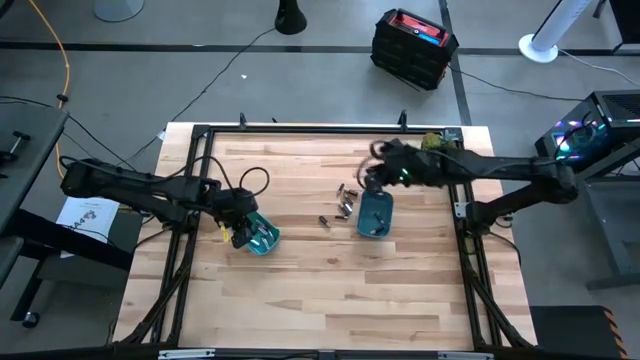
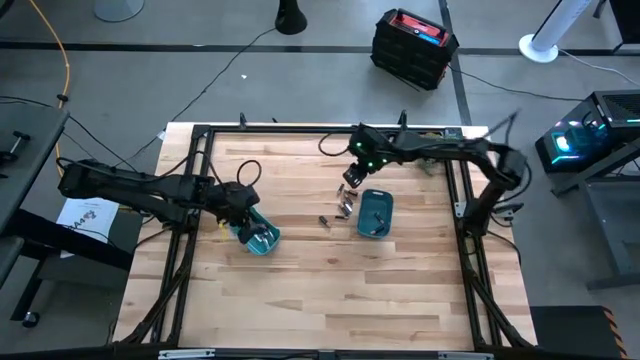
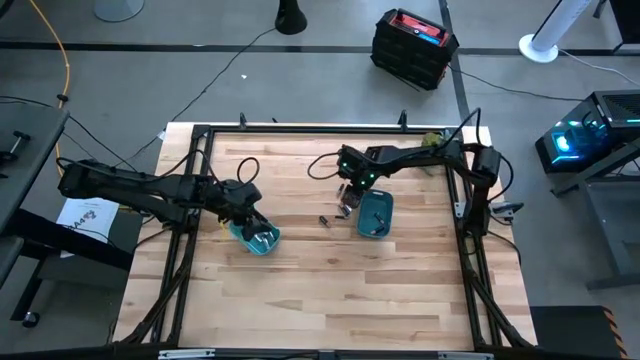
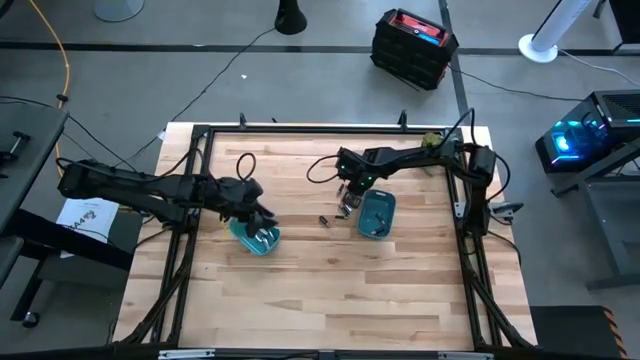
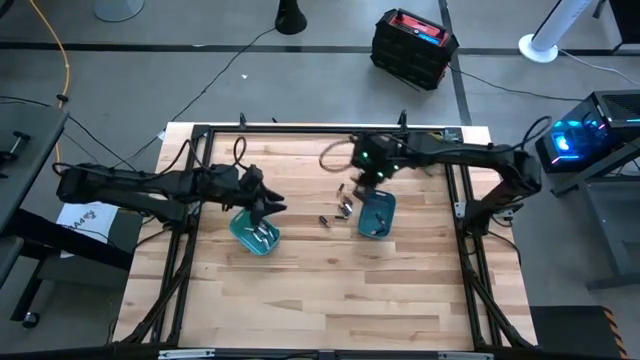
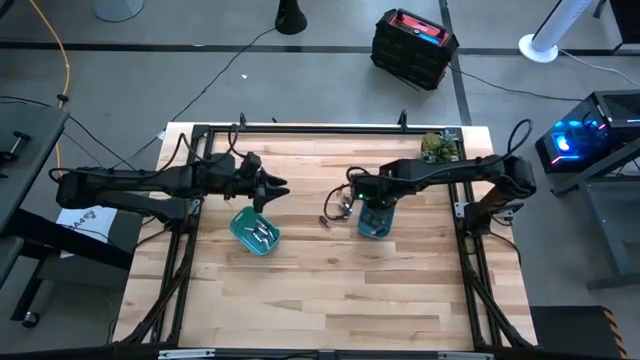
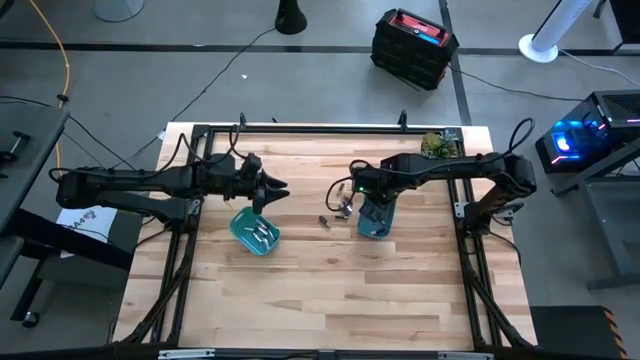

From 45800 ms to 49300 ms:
Task: Sort batteries
Put the black battery into the blue bin

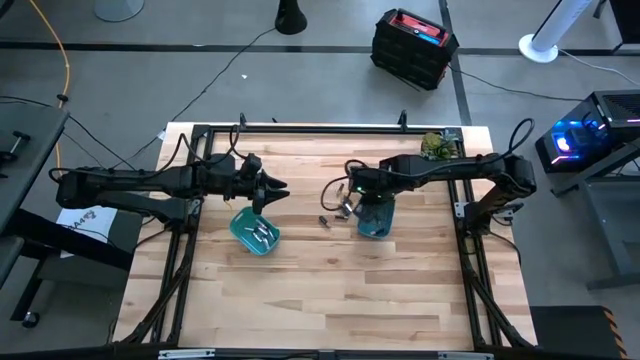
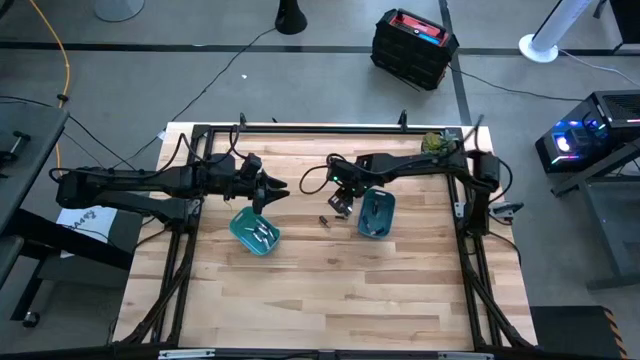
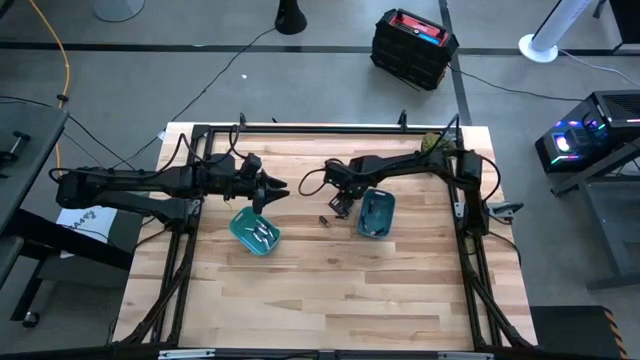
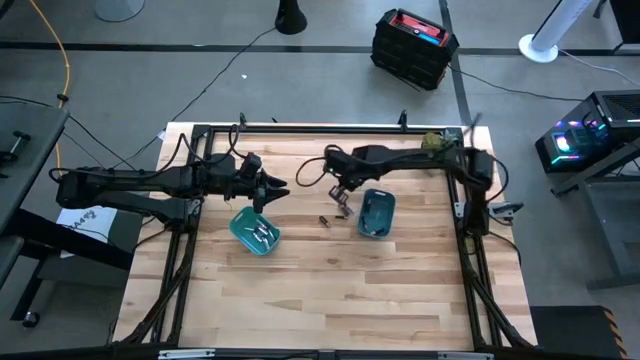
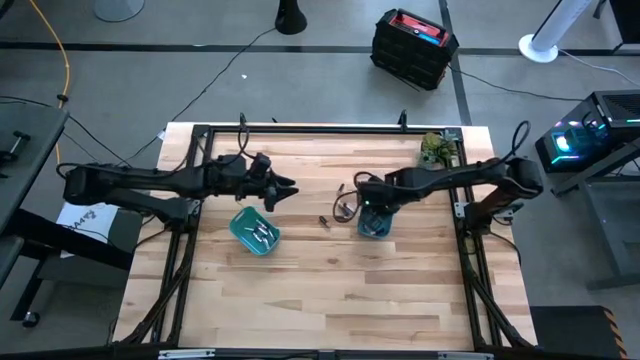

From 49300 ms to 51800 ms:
Put the black battery into the blue bin

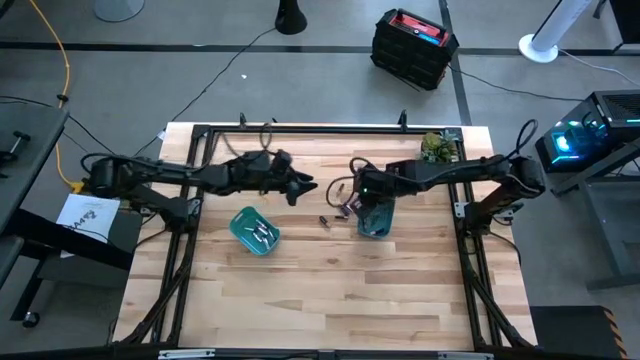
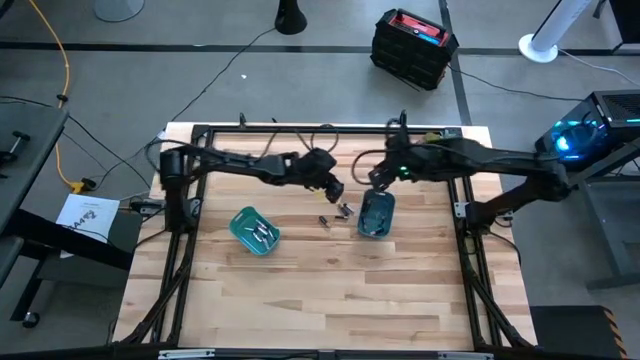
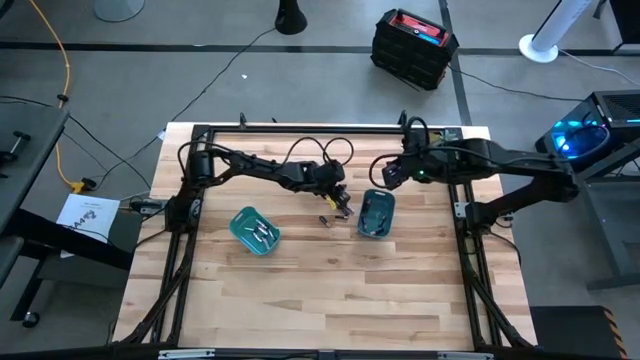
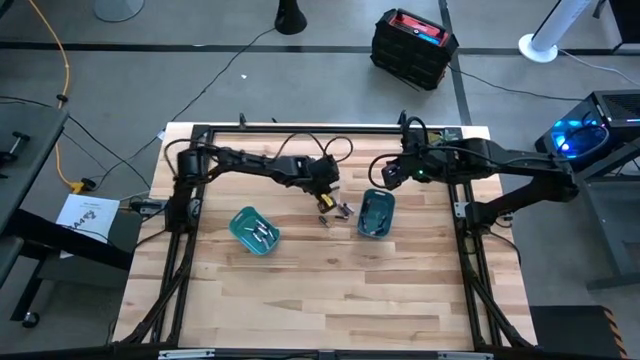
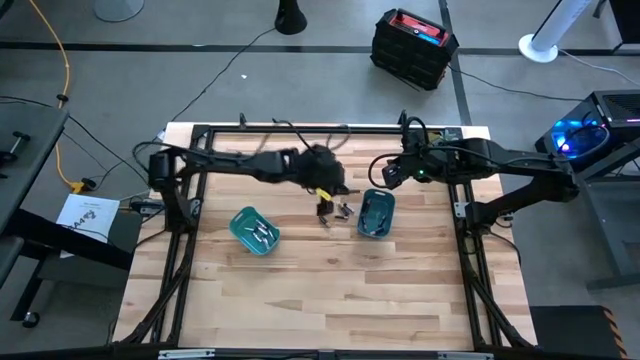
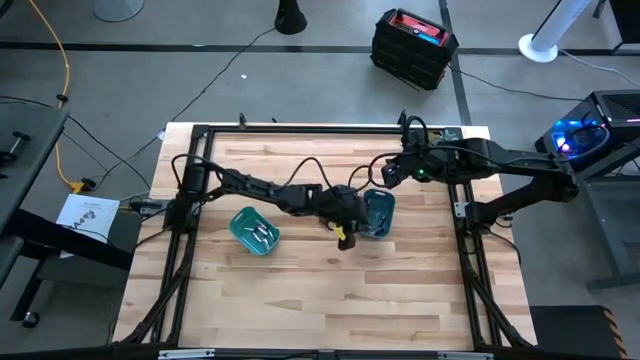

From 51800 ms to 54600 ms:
Put the black battery into the blue bin

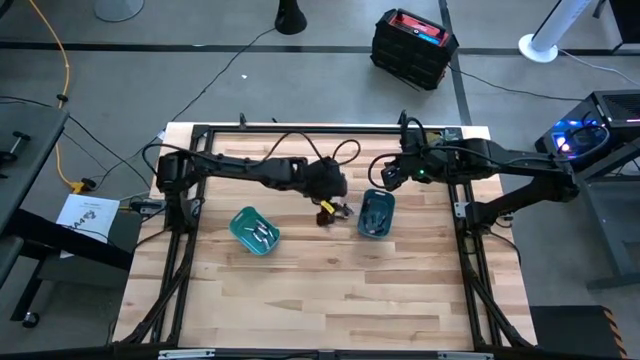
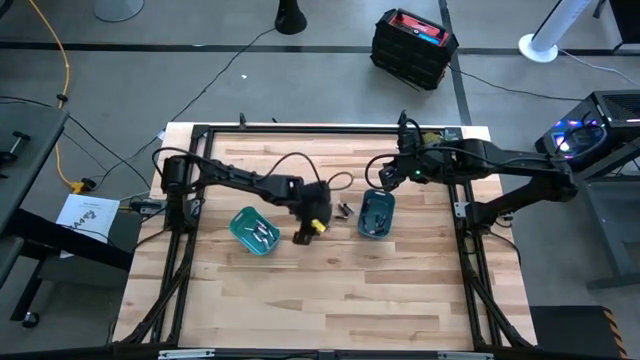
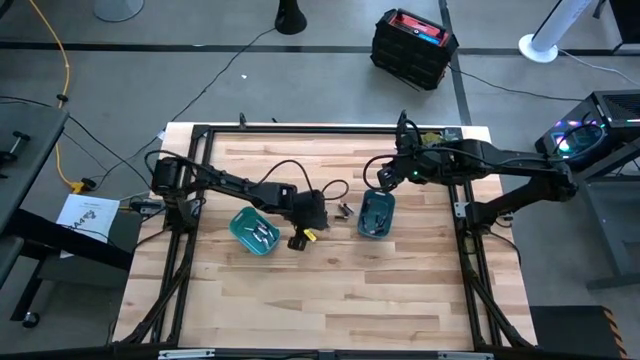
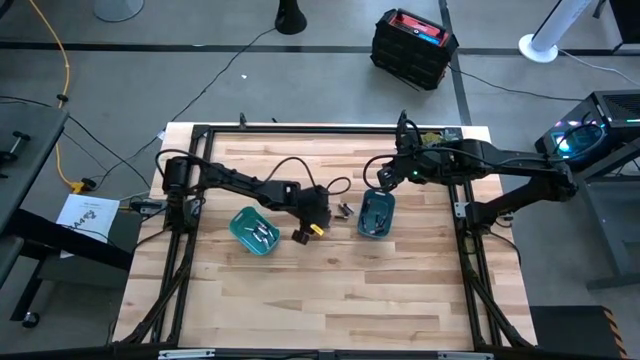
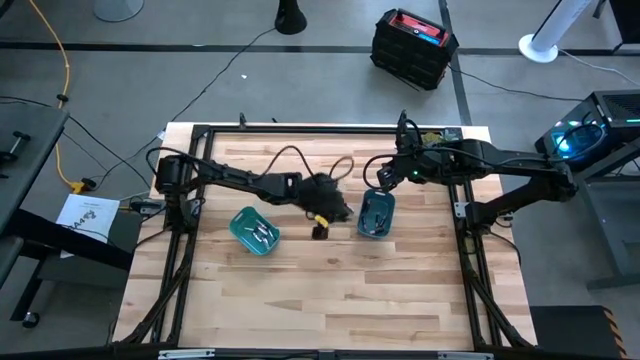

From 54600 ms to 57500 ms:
Put the black battery into the blue bin

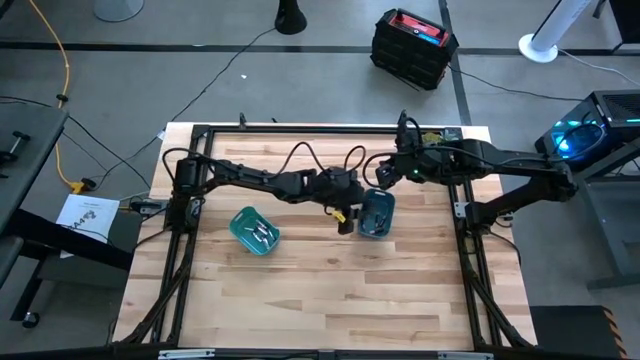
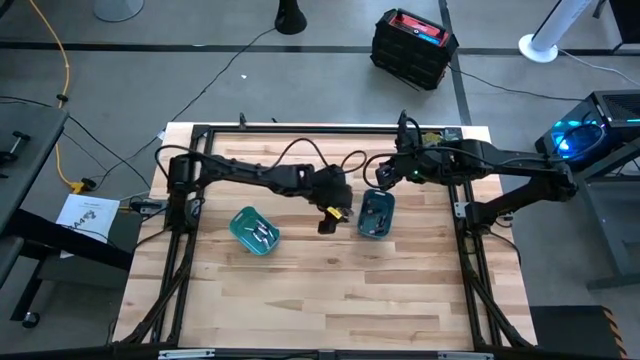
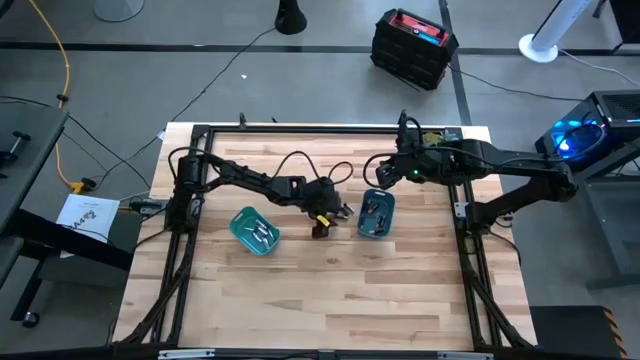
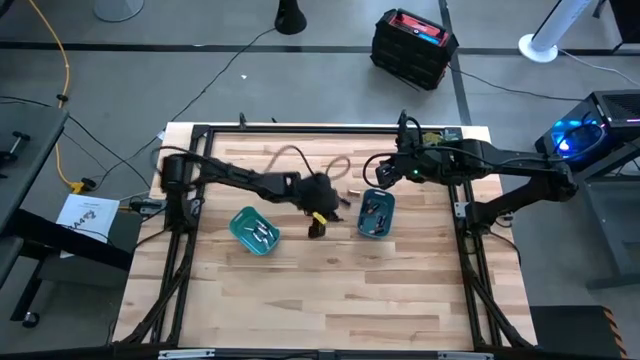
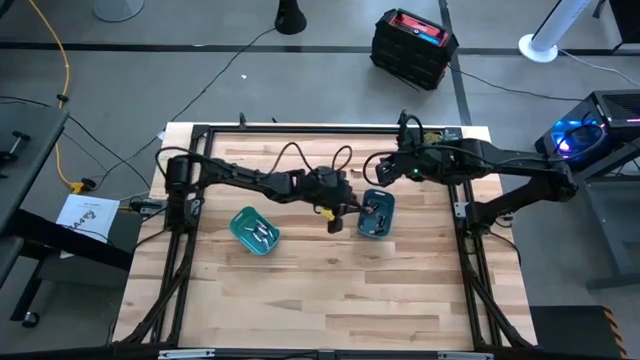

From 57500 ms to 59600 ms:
Put the black battery into the blue bin

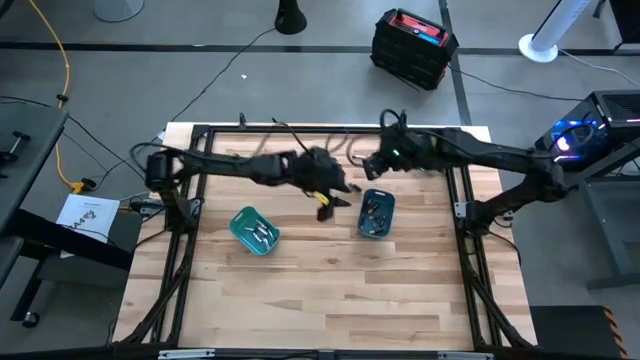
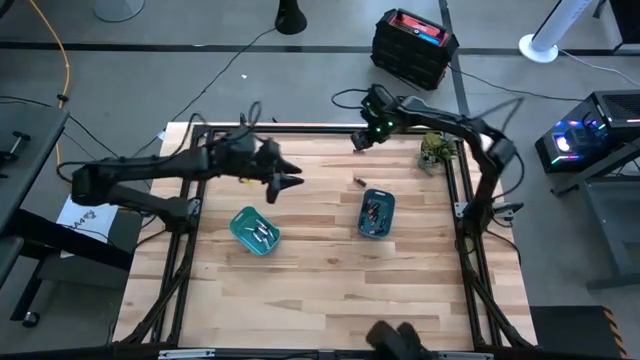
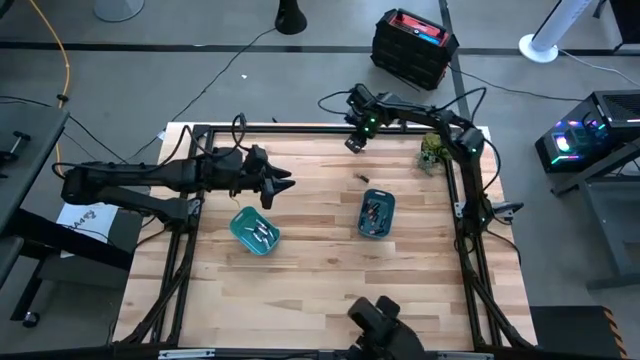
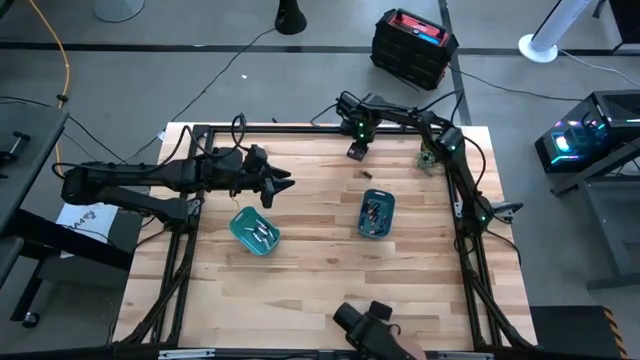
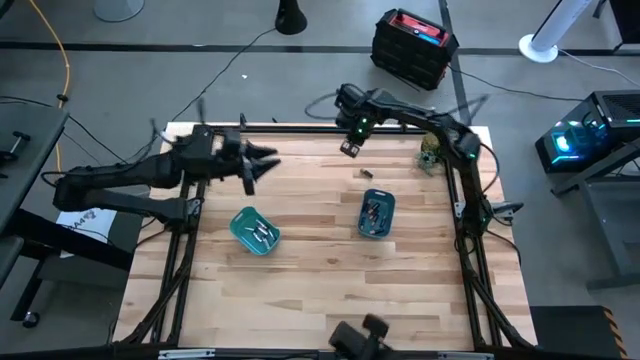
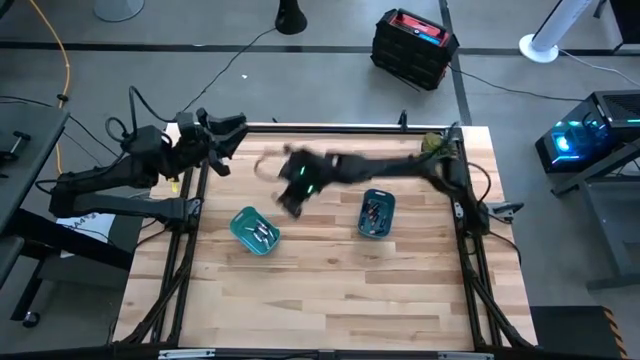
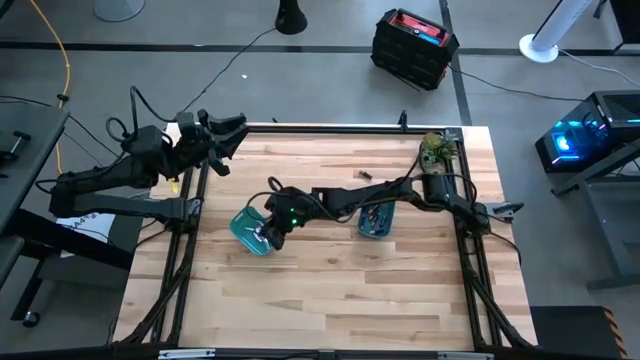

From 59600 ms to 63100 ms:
Put the silver battery into the green bin

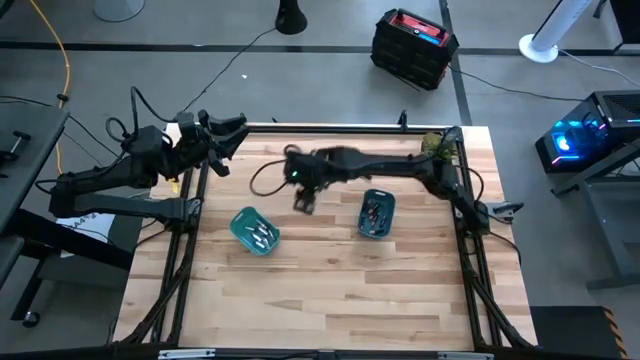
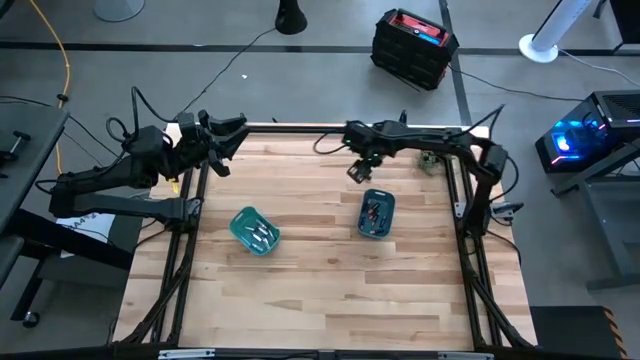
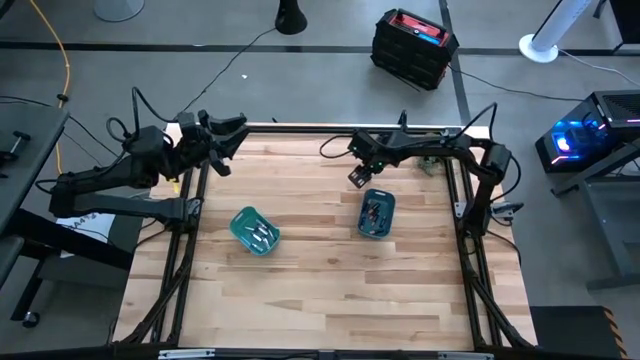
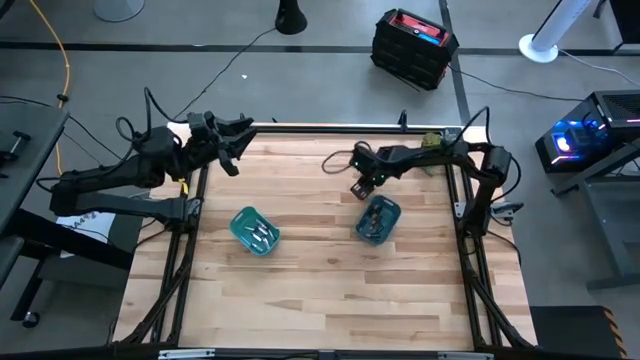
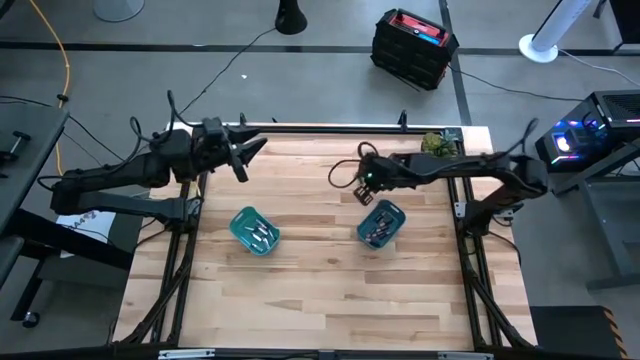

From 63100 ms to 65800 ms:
Put the black battery into the blue bin

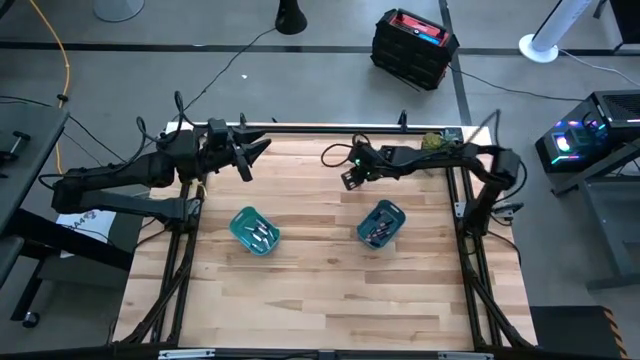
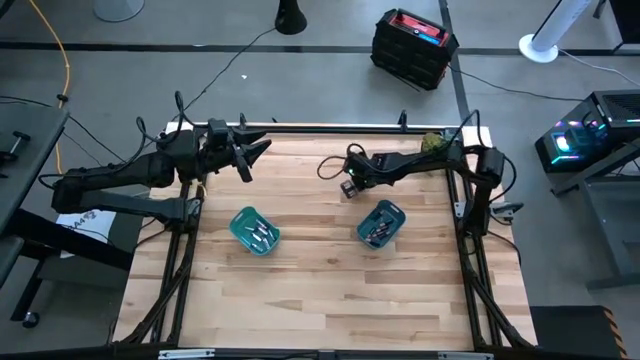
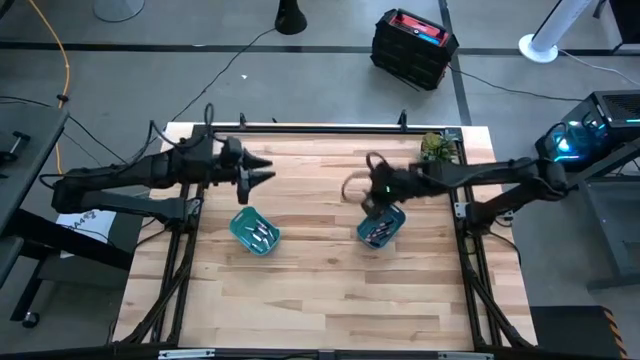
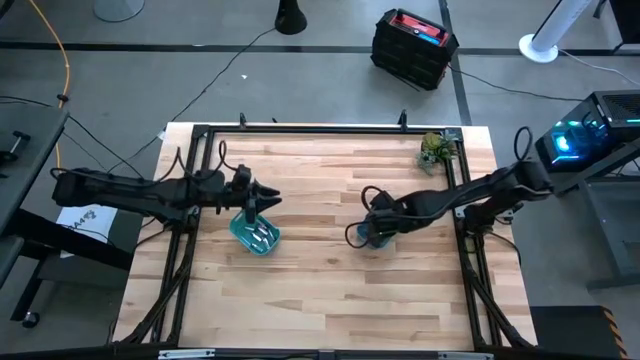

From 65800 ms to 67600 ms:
Put the black battery into the blue bin
